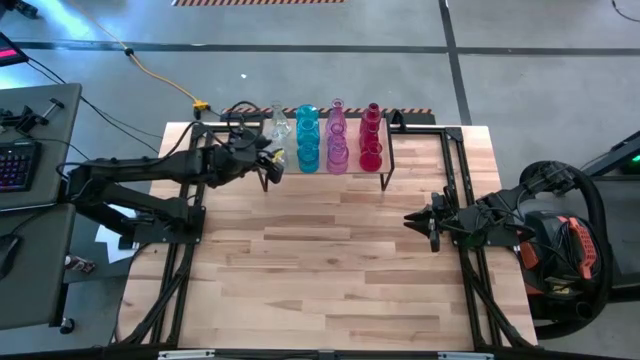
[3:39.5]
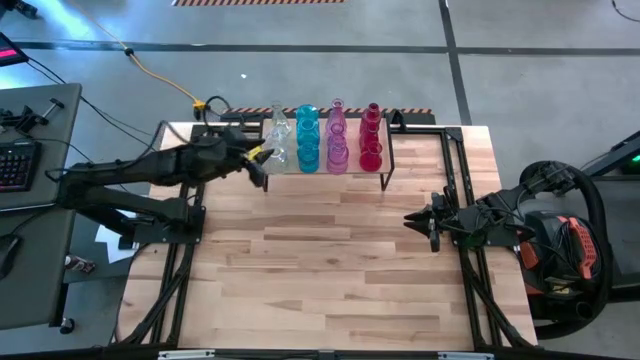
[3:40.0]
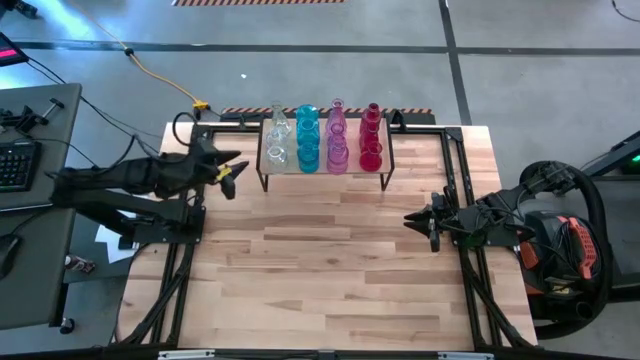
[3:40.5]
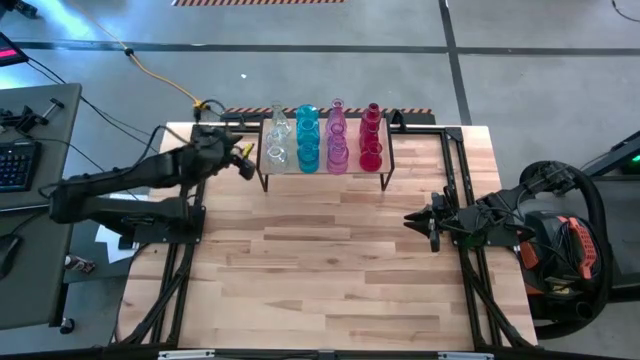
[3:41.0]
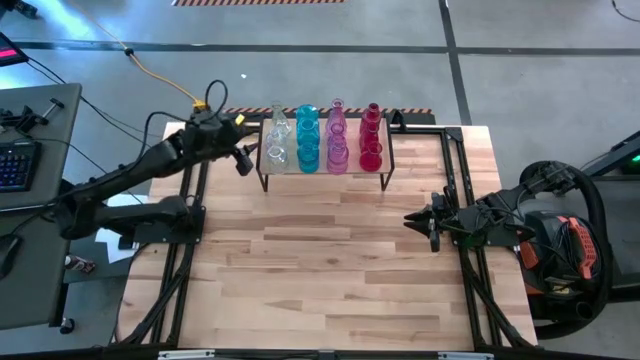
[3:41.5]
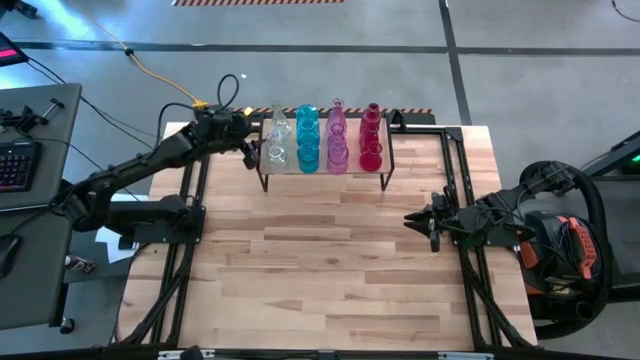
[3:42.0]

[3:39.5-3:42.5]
Task: sort vases onto shelf
Adjust the transparent flower vase on the shelf

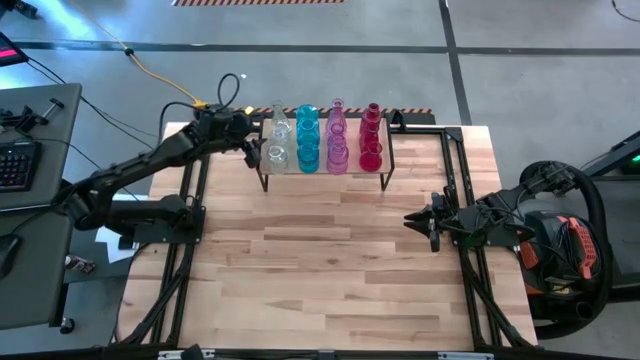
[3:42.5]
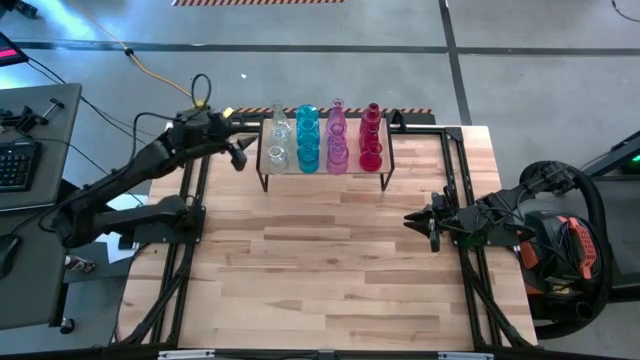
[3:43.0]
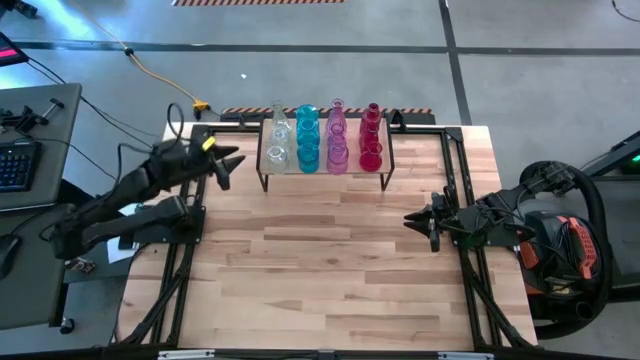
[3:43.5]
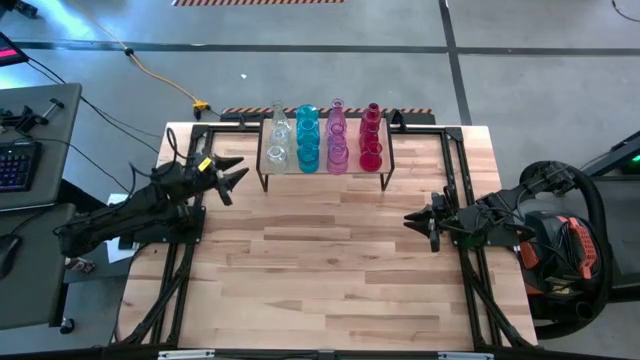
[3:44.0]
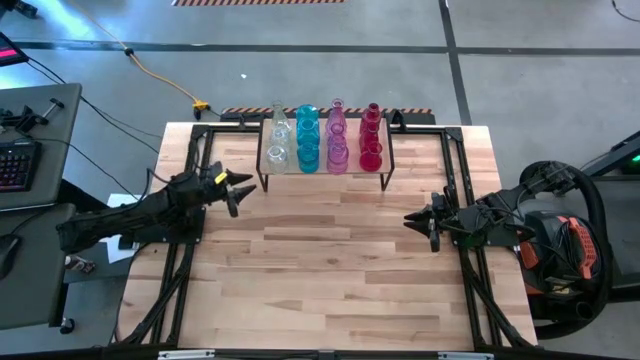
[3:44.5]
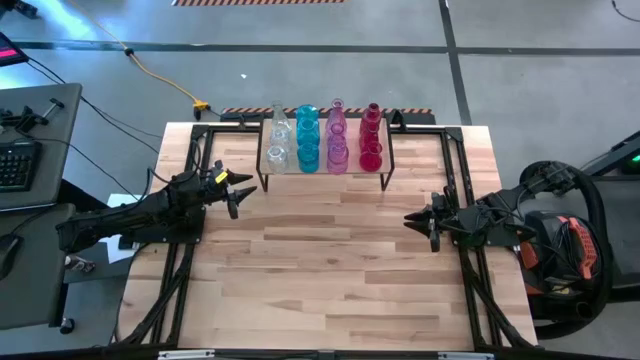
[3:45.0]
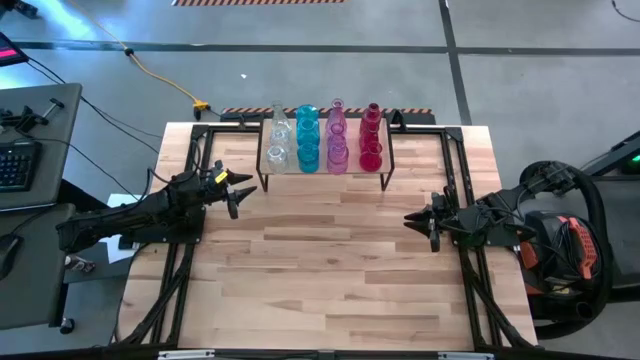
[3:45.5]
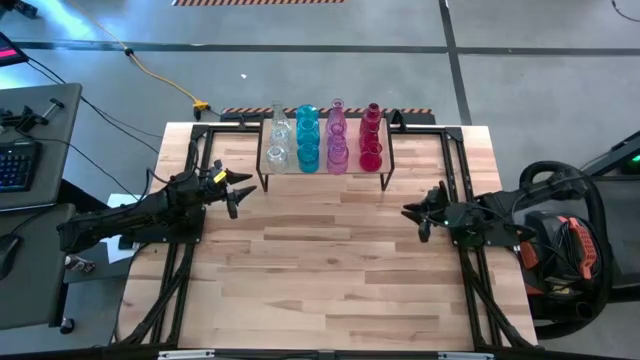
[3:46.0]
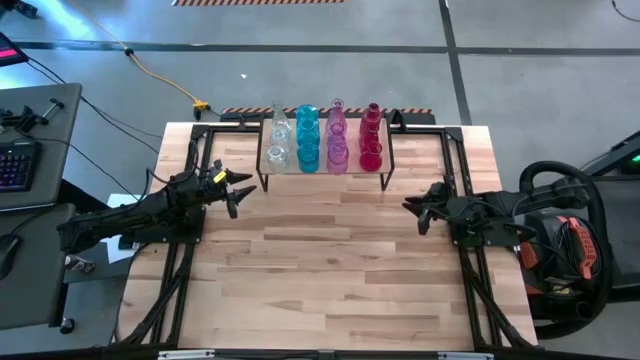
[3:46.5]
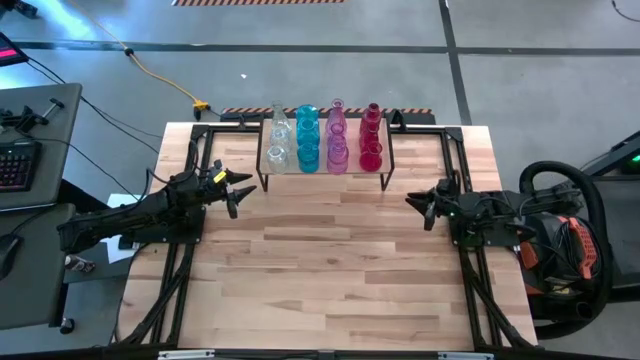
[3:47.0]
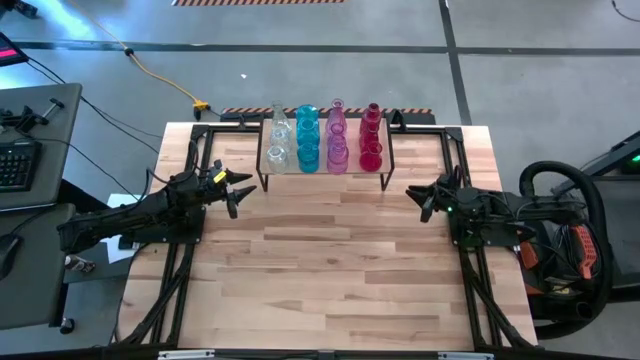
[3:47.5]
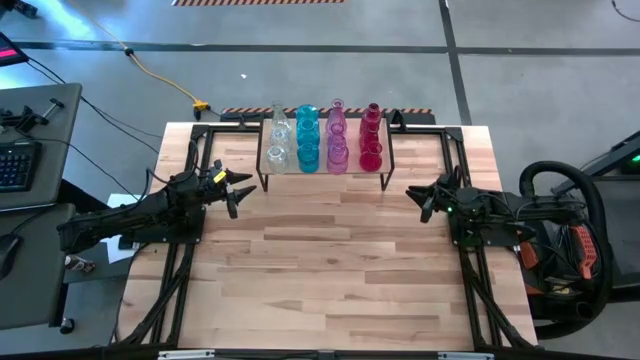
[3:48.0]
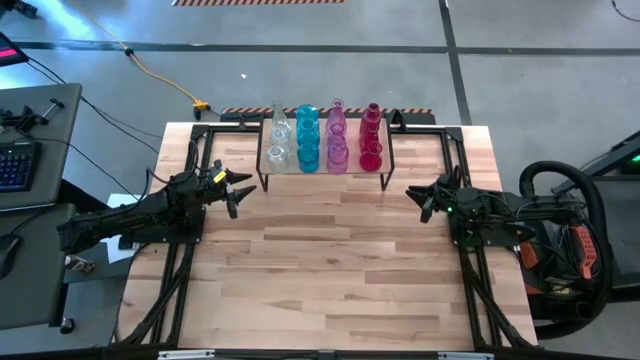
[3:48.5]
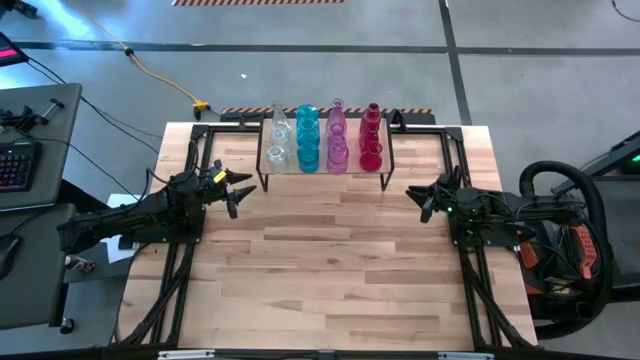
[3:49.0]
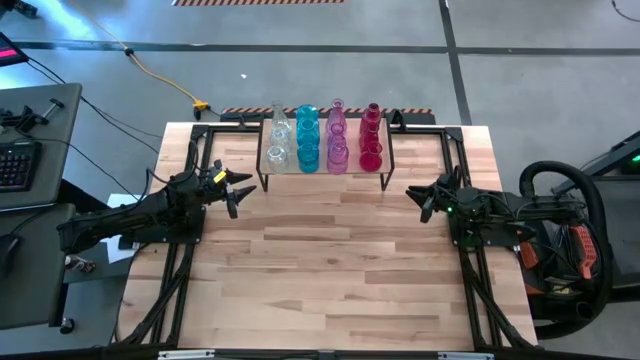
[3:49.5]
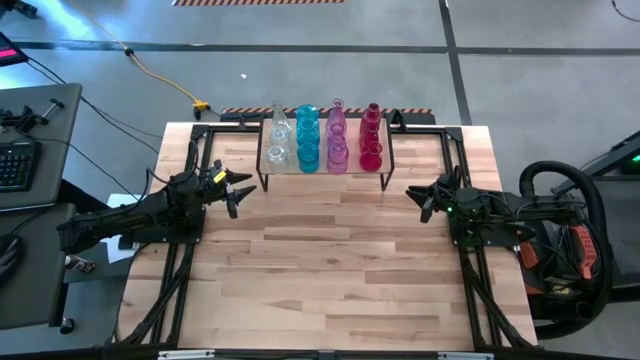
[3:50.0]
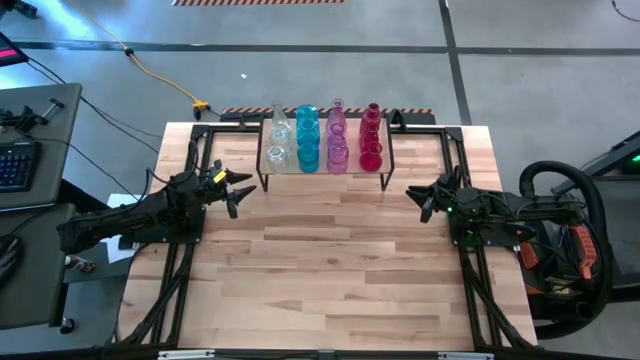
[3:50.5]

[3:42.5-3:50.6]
Return to Home Position

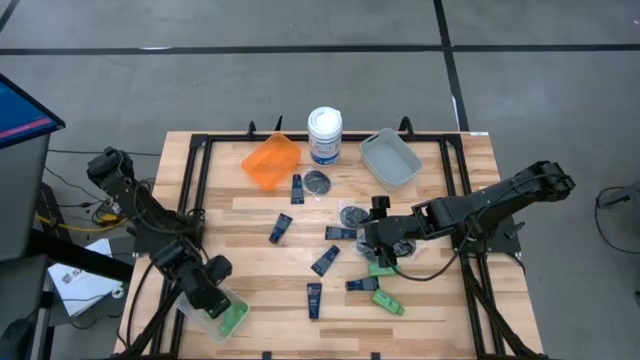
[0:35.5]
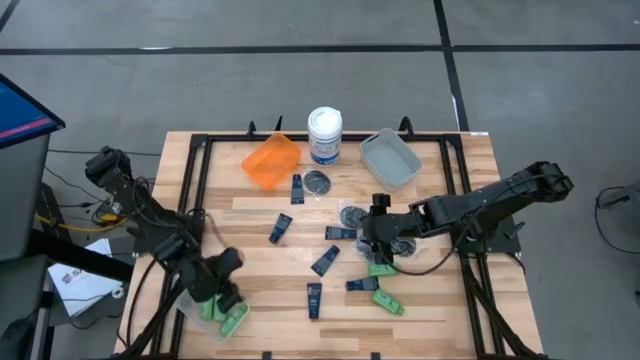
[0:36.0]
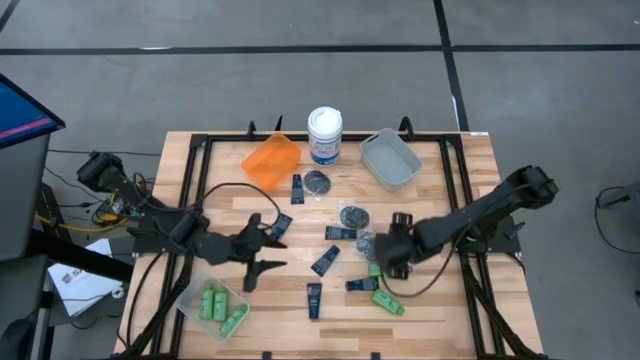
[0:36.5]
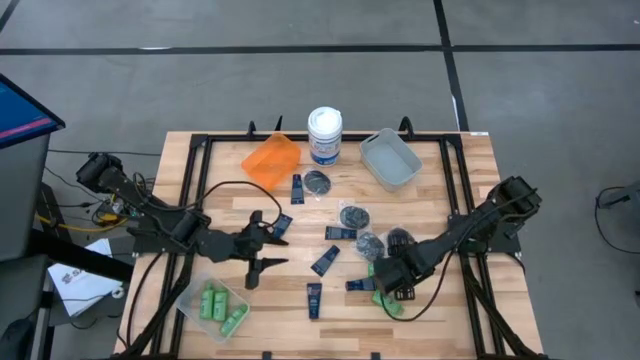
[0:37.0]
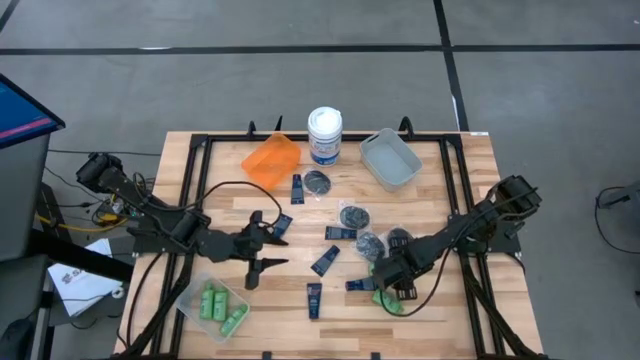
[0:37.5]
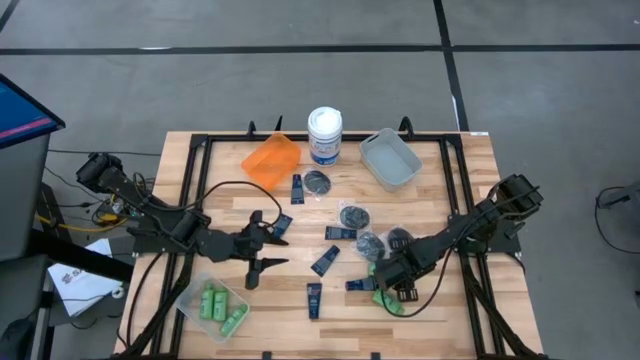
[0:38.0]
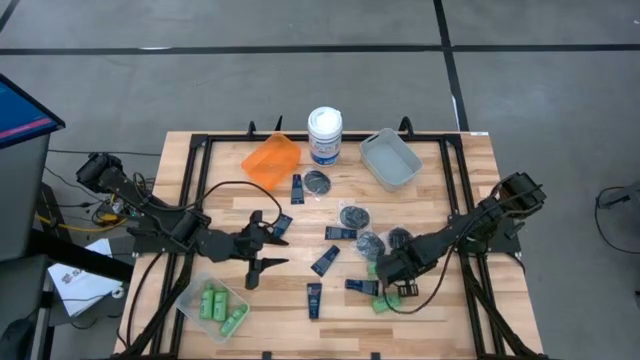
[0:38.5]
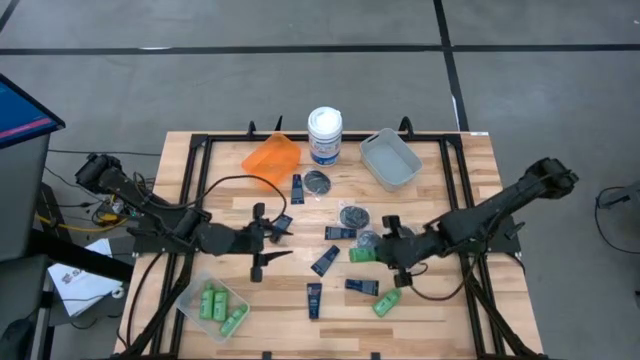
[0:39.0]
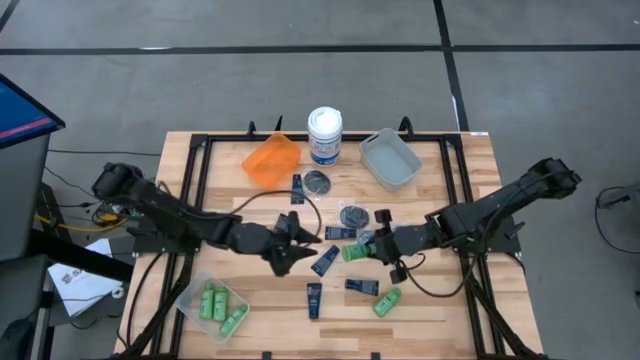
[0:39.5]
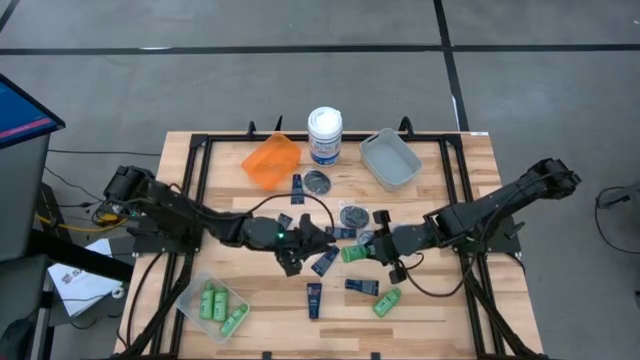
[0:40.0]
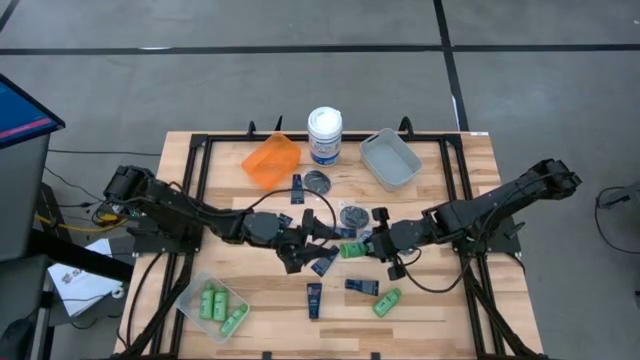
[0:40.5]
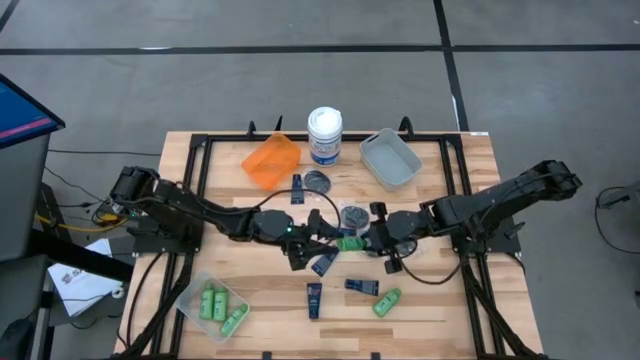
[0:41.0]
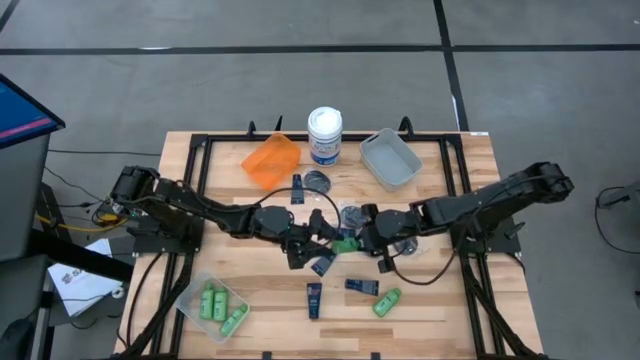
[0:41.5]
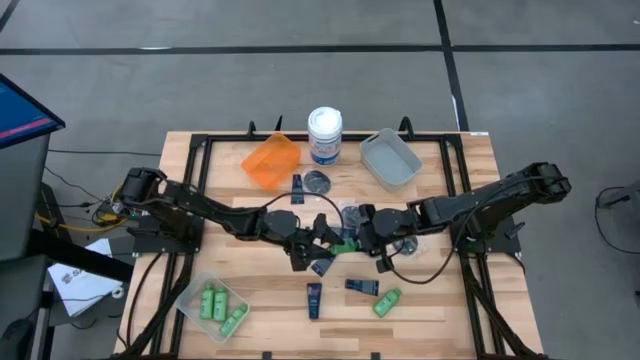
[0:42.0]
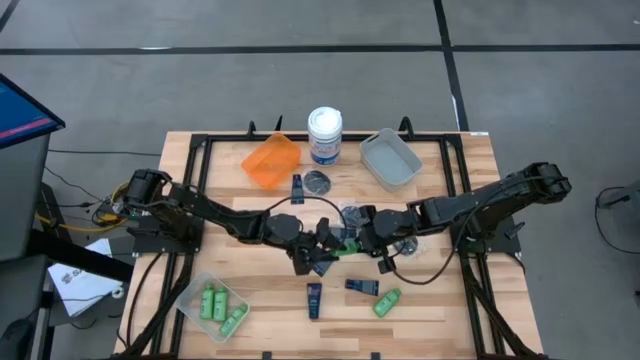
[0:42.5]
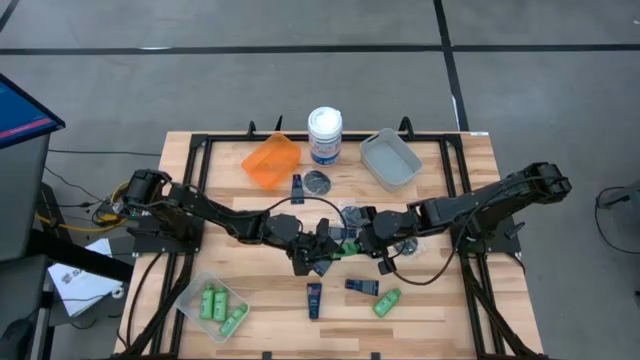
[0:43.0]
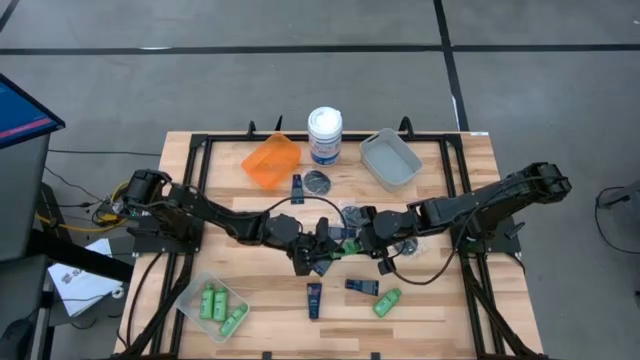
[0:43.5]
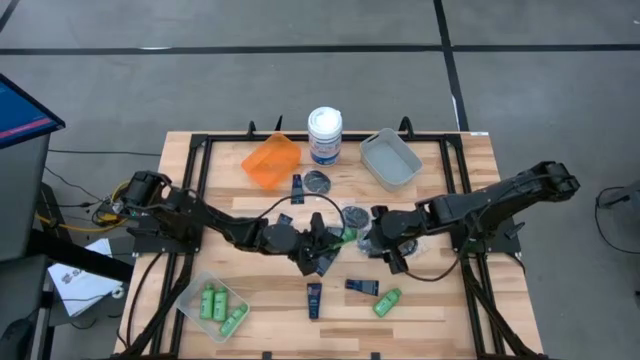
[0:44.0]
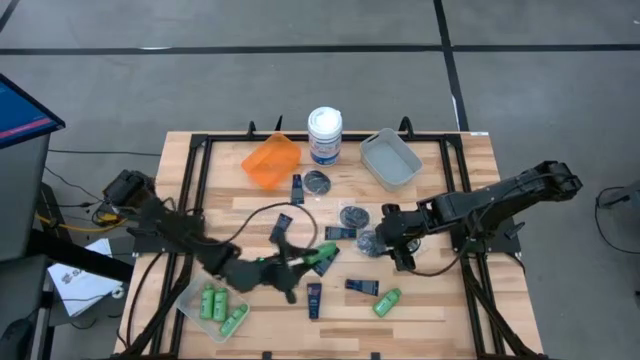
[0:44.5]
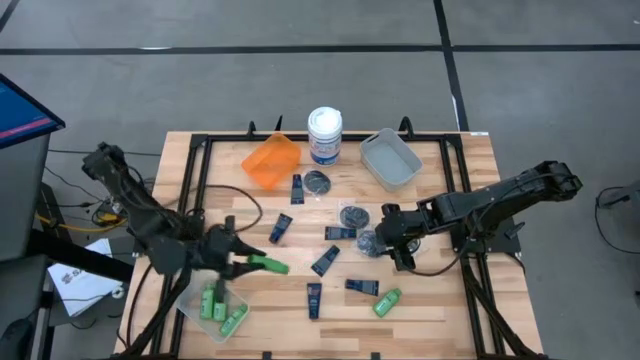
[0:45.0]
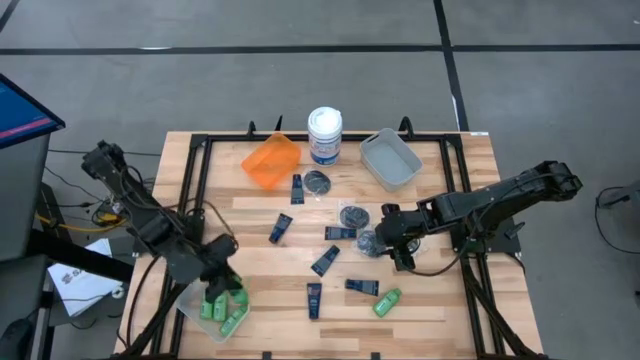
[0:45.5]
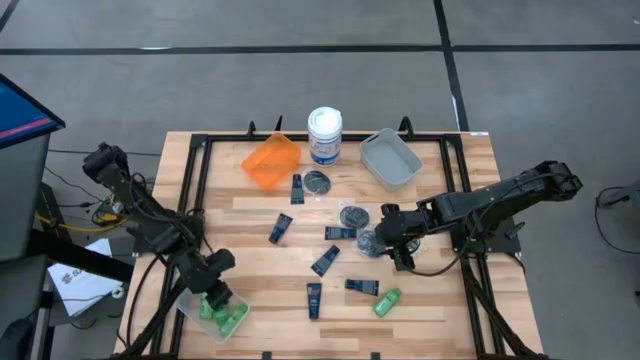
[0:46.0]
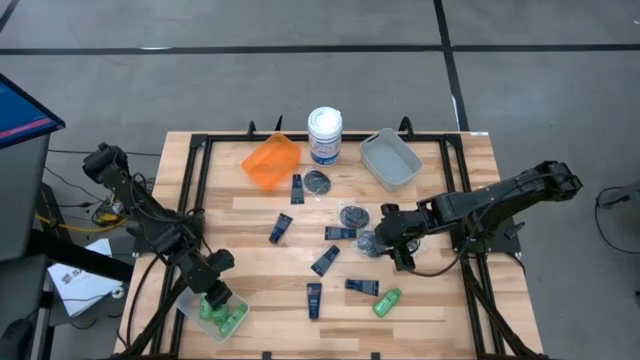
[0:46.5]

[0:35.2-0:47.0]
Task: Pick & Place Travel size toiletries
Put the shampoo into the white bin
